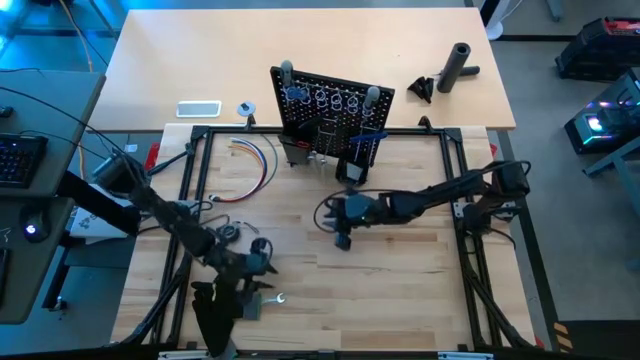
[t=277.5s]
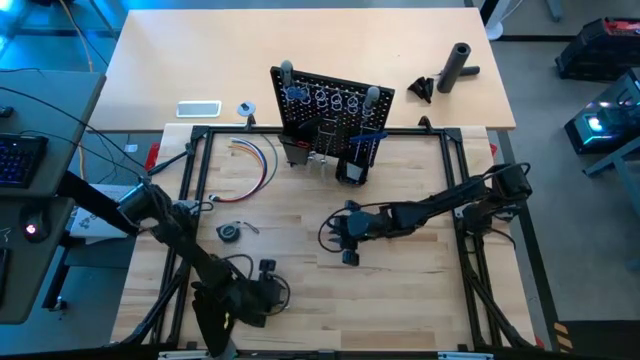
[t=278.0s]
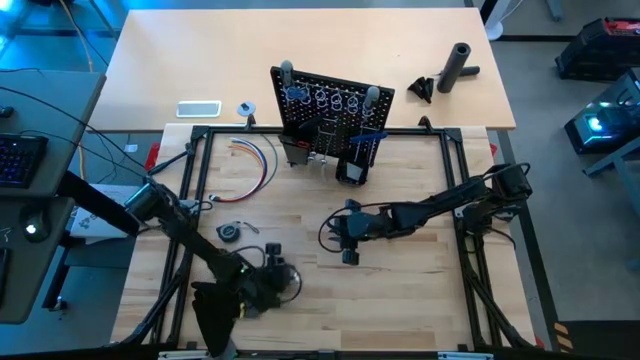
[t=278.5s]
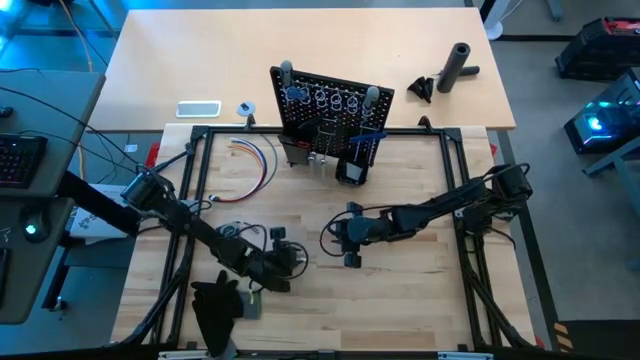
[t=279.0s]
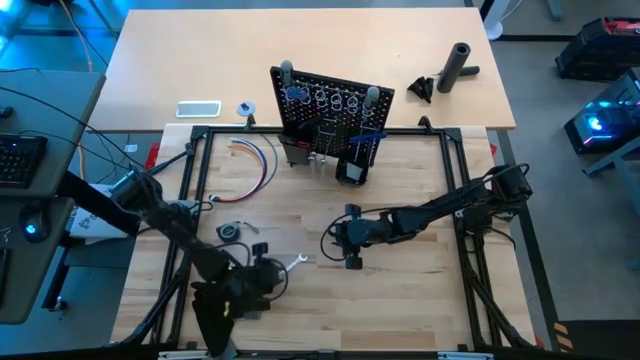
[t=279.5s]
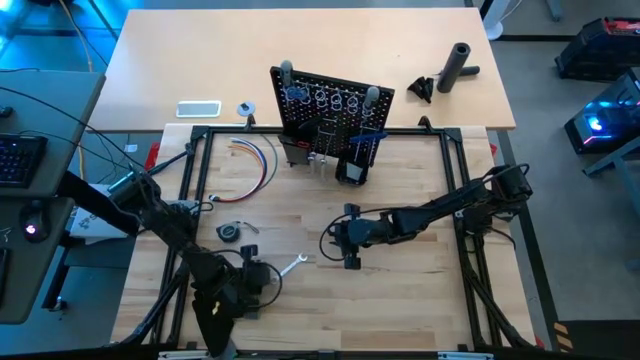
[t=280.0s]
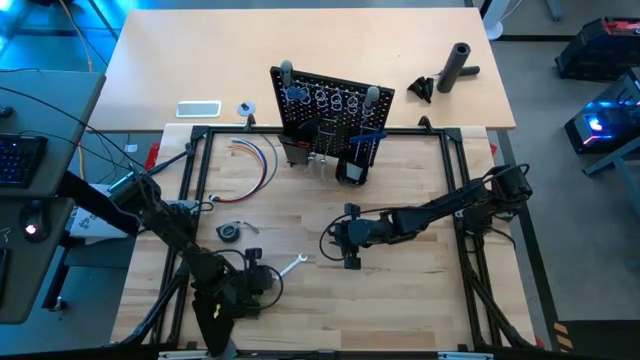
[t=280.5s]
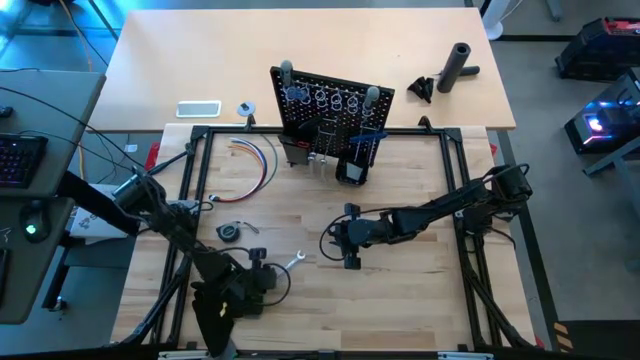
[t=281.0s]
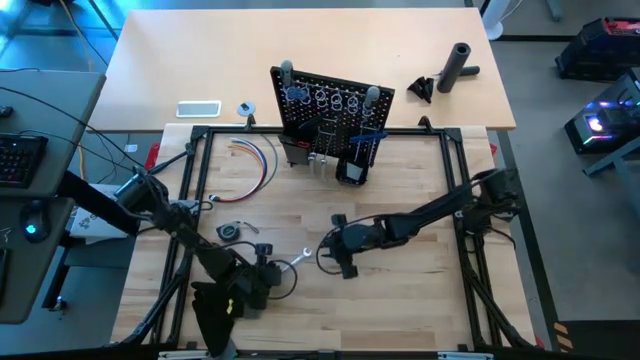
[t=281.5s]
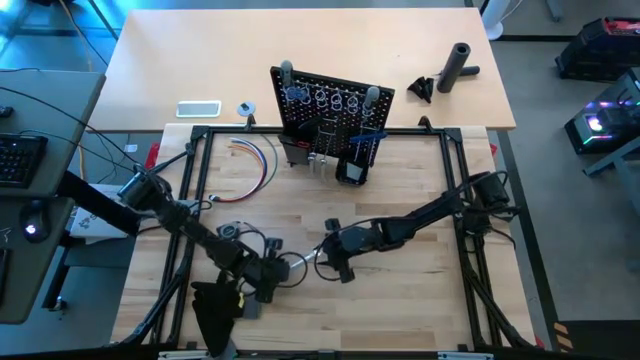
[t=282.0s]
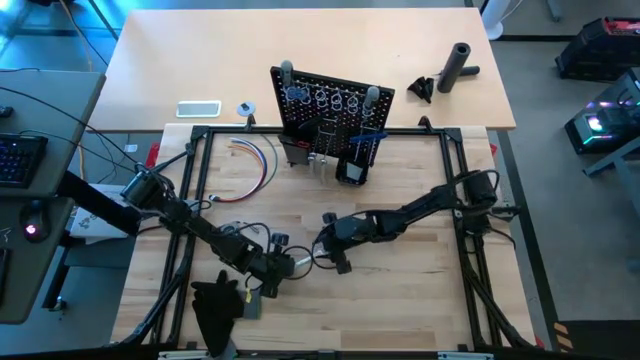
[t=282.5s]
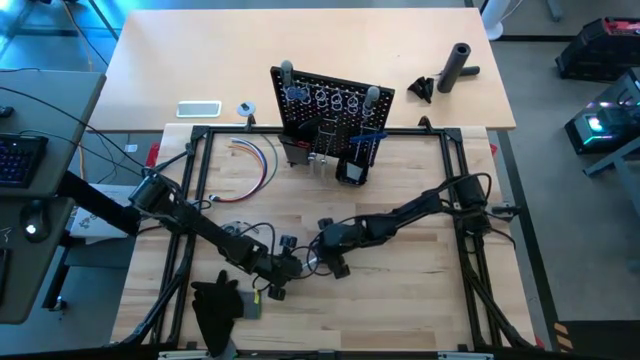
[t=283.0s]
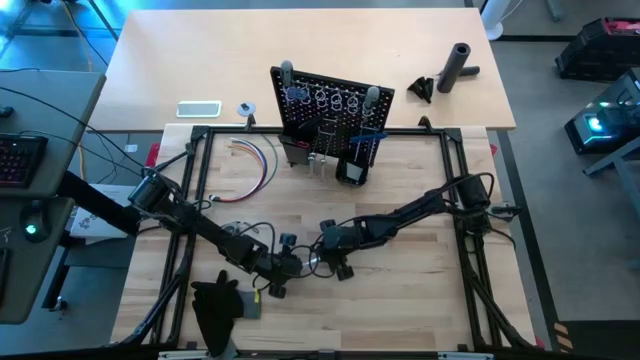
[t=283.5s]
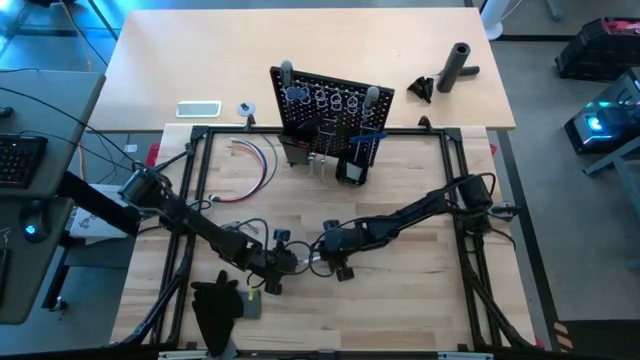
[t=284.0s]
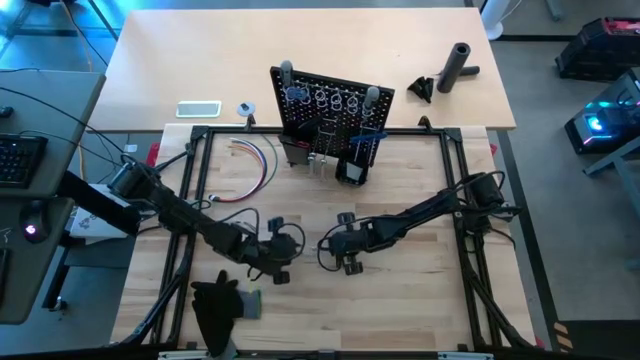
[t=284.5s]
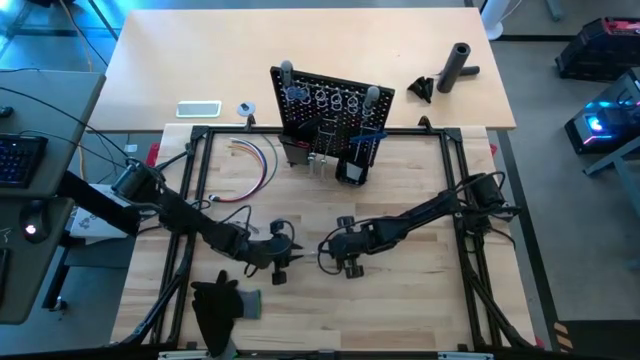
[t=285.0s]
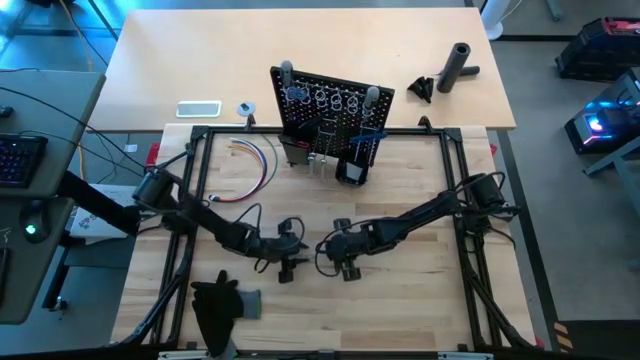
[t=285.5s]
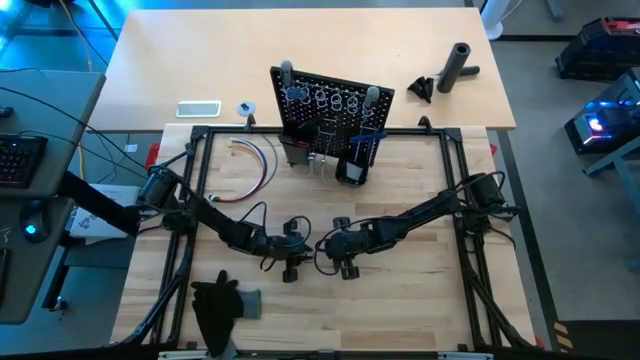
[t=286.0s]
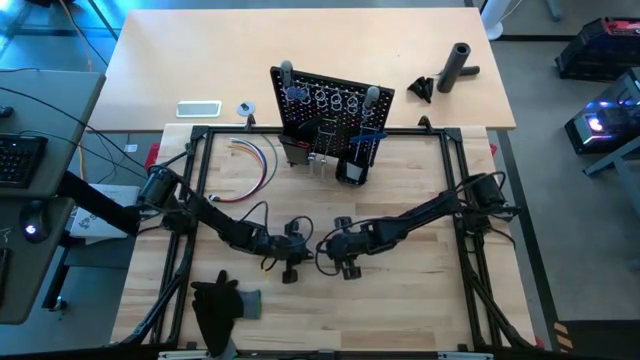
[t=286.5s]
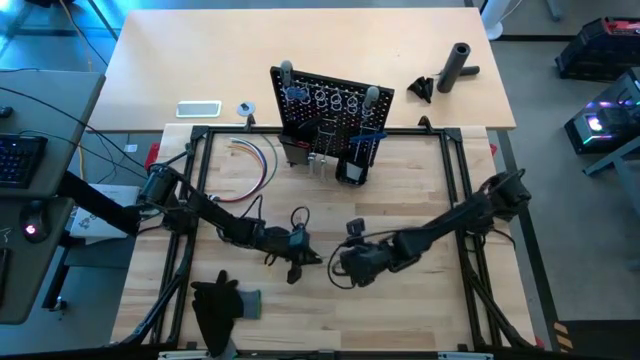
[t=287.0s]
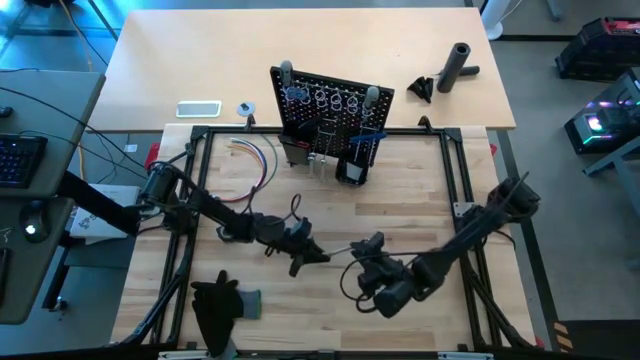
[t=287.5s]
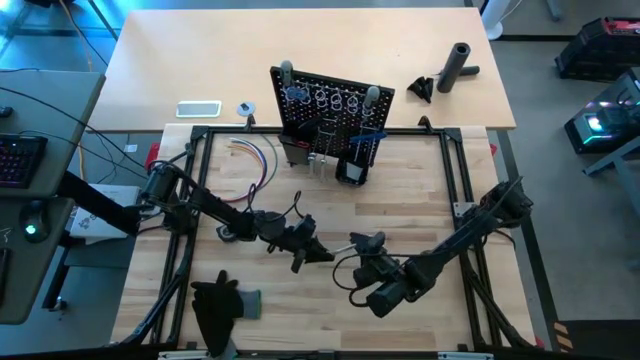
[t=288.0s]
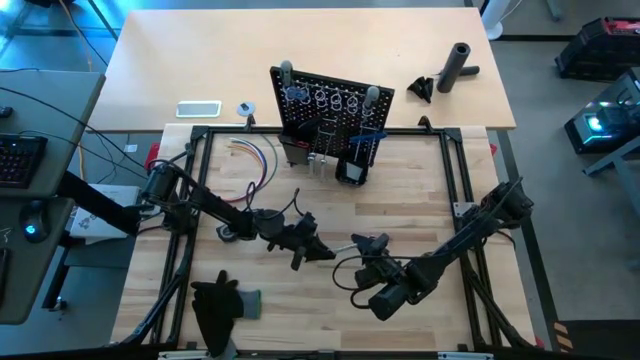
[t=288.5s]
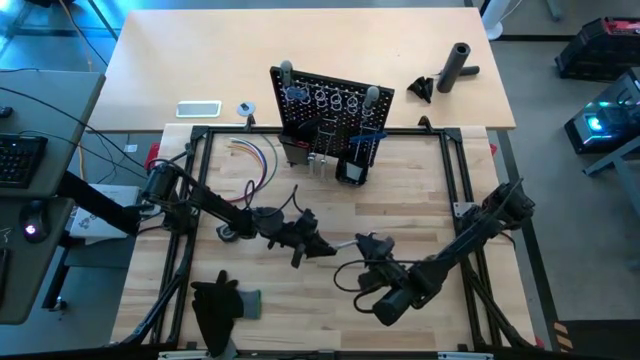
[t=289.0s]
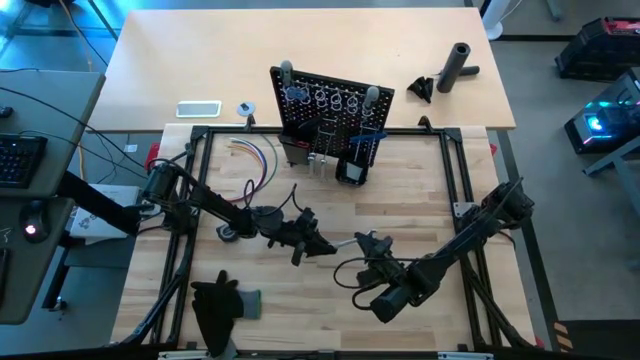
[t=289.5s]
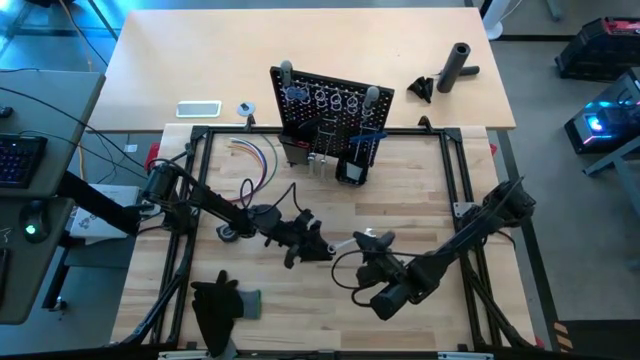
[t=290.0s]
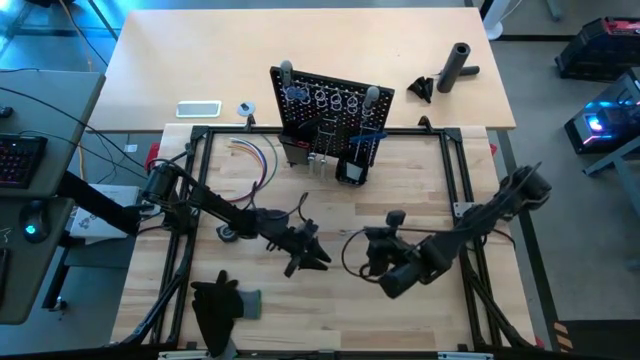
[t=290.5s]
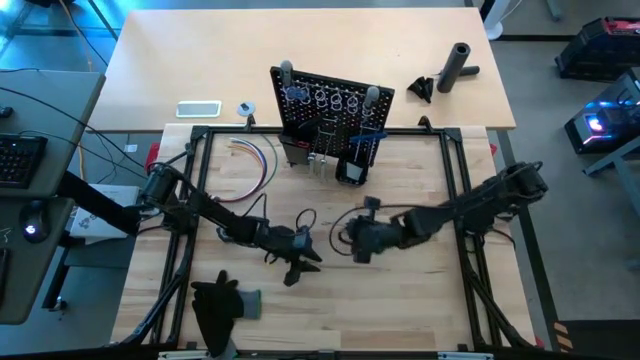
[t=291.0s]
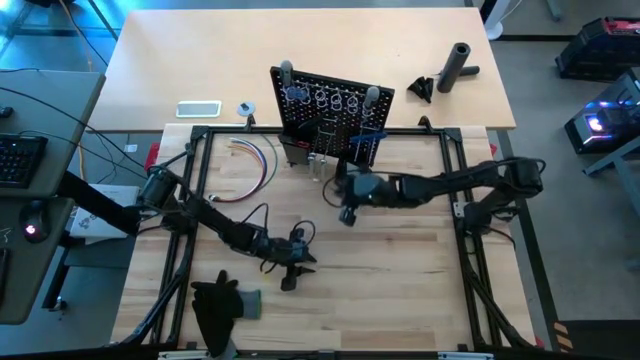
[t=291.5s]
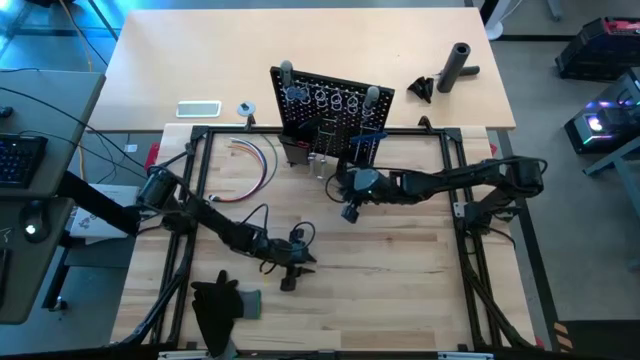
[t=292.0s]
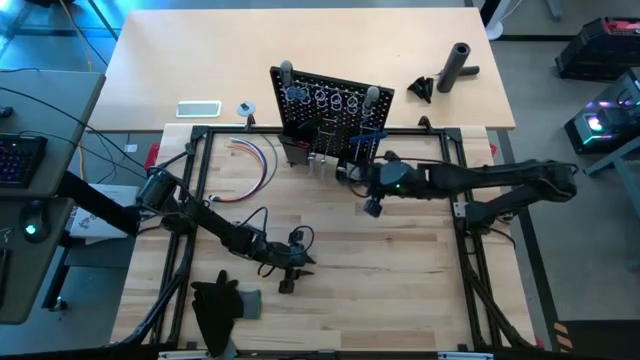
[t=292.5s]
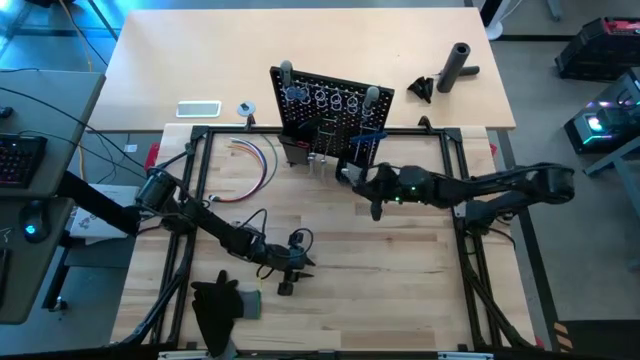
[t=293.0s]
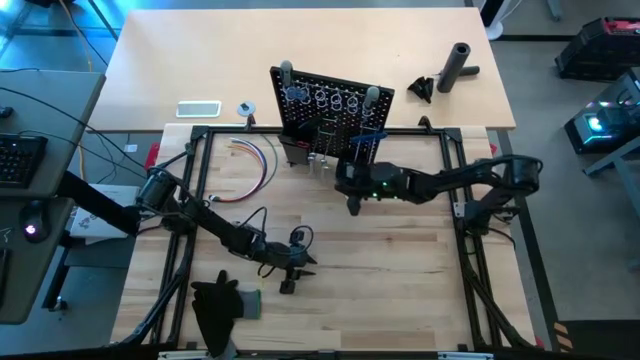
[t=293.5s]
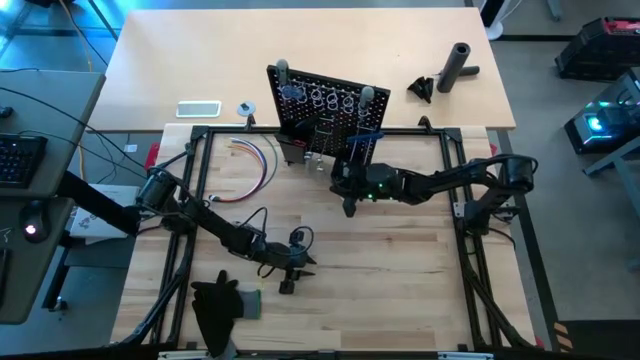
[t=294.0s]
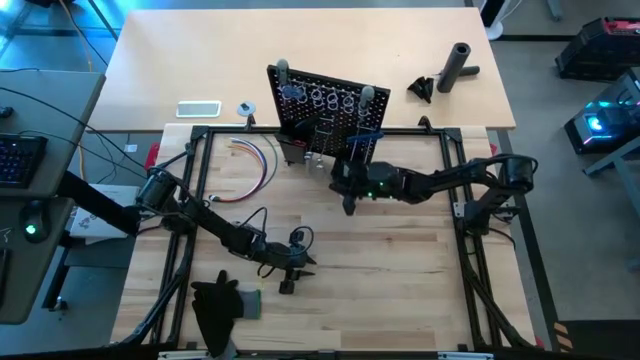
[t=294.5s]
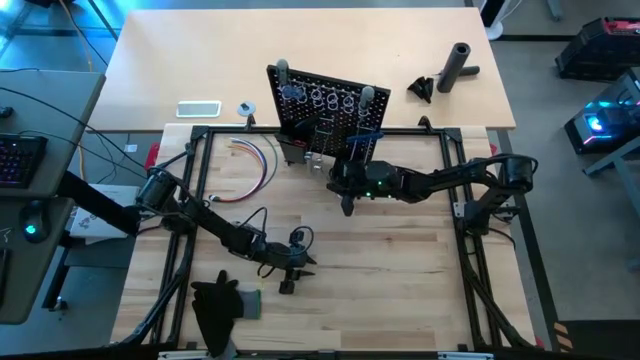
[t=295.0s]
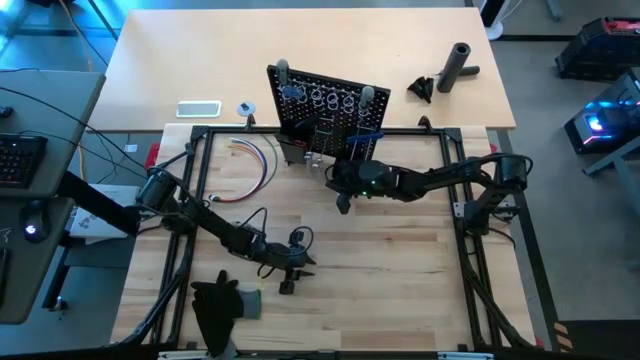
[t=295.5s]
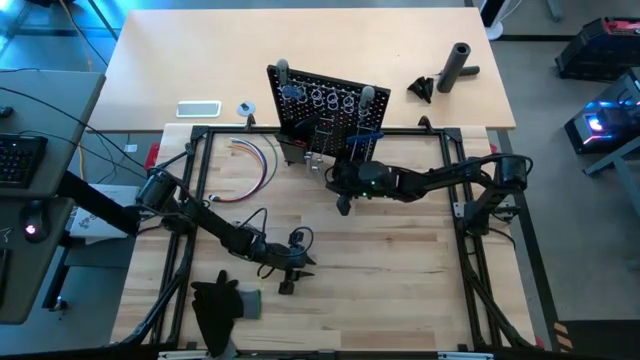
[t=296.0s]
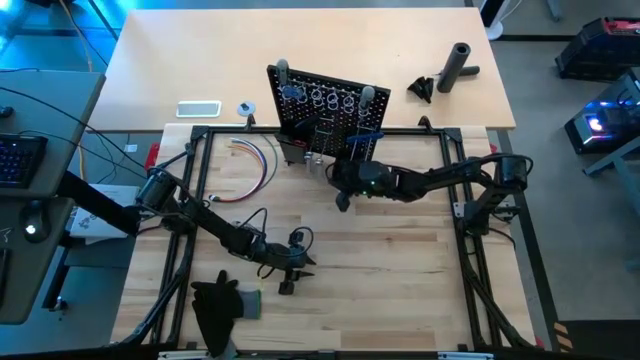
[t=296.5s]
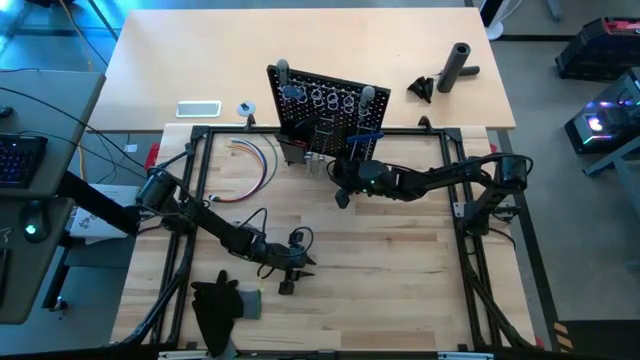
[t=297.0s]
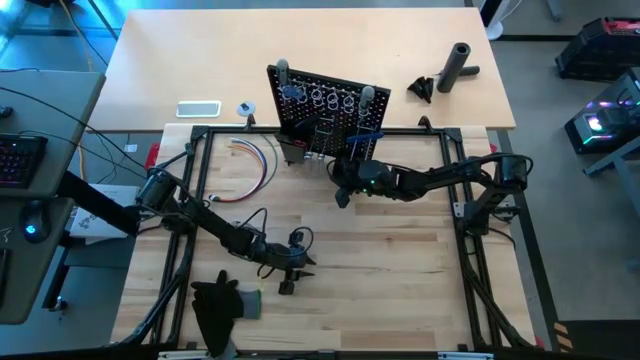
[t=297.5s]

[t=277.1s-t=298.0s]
Task: Hang tools onto peg board
Hang the wrench on the black pegboard
